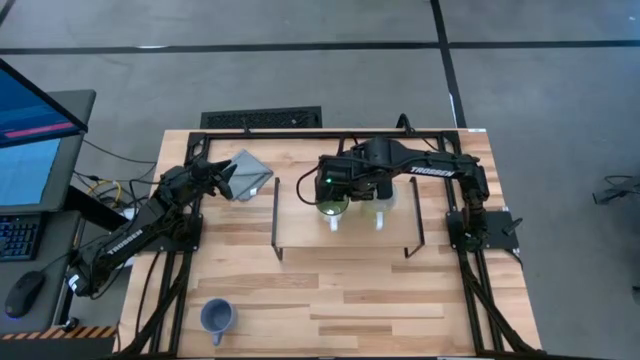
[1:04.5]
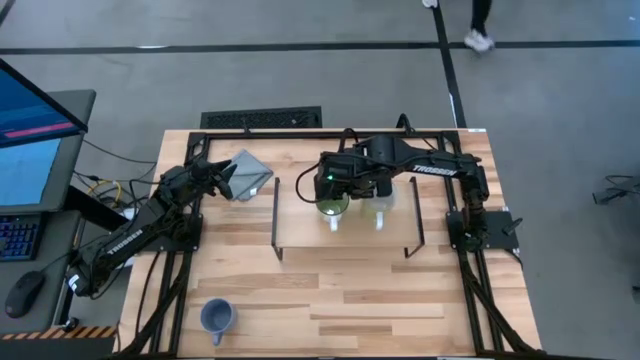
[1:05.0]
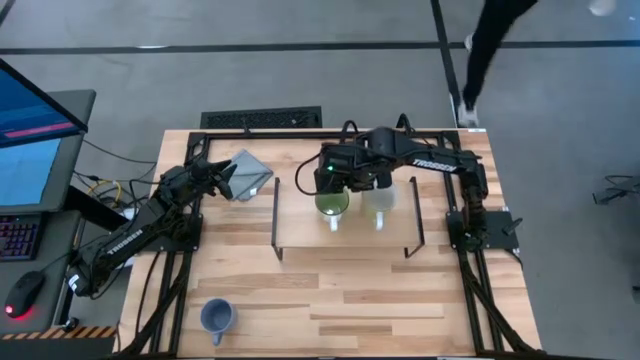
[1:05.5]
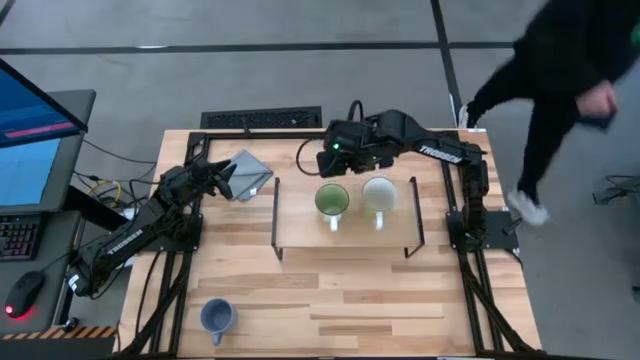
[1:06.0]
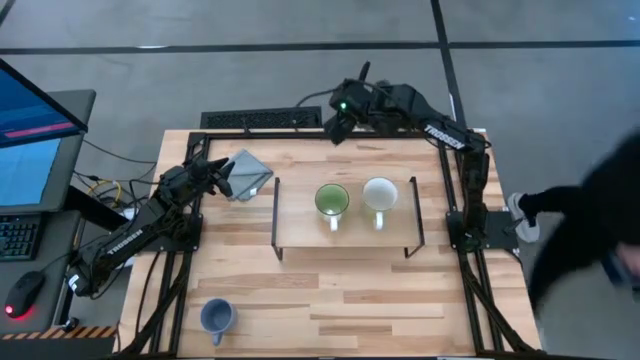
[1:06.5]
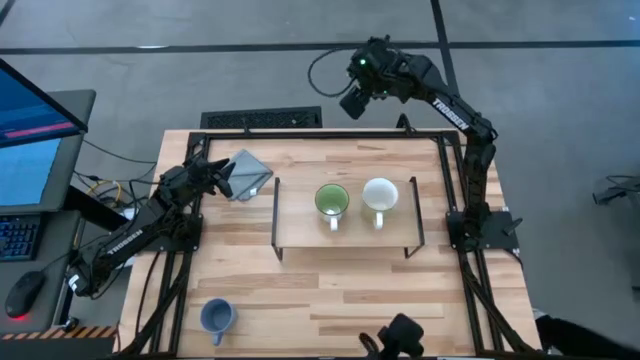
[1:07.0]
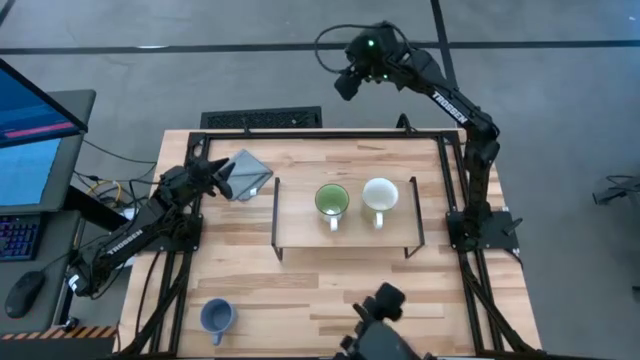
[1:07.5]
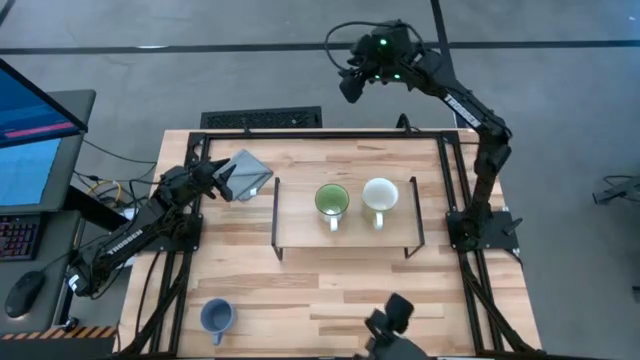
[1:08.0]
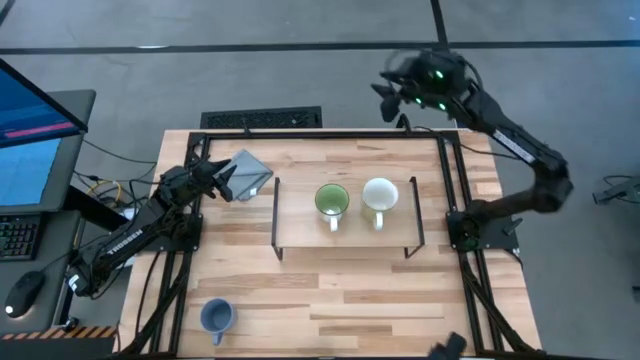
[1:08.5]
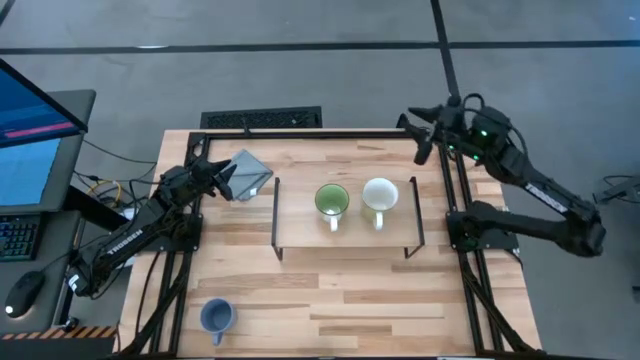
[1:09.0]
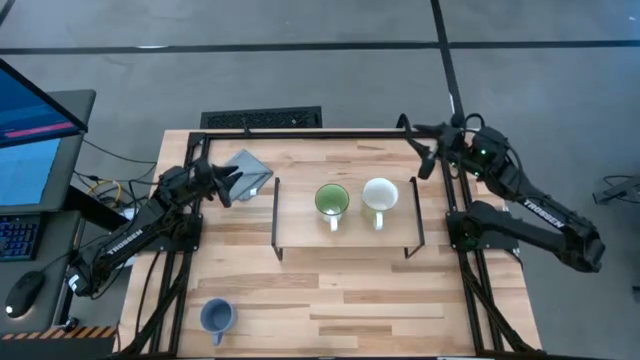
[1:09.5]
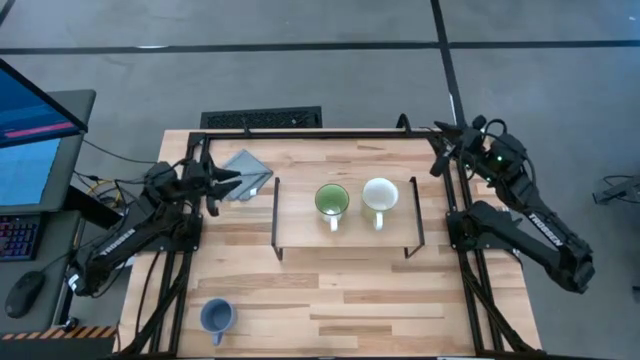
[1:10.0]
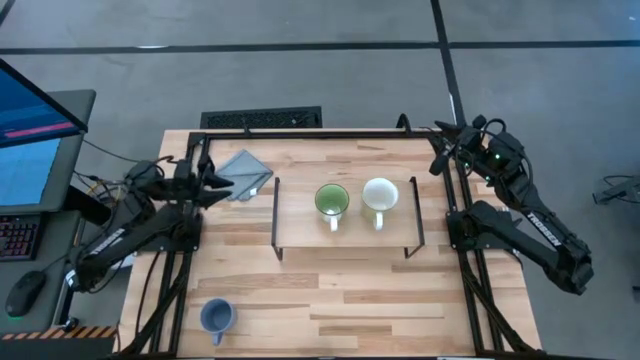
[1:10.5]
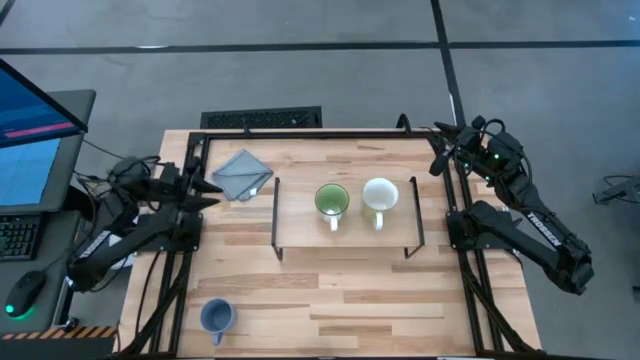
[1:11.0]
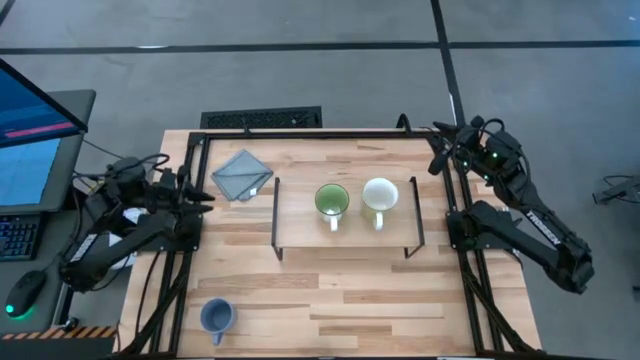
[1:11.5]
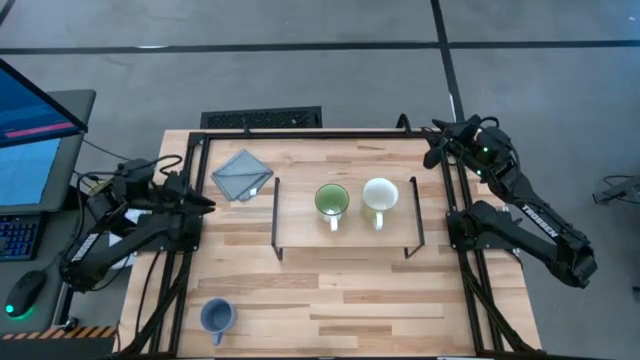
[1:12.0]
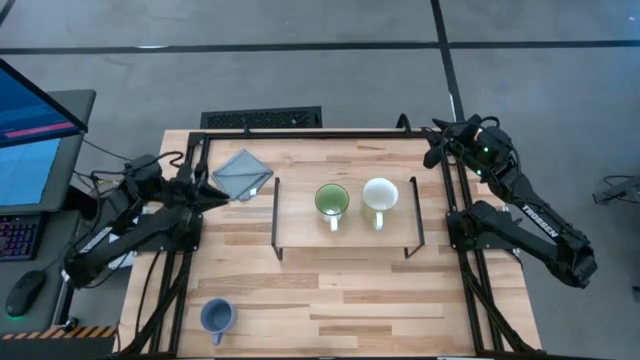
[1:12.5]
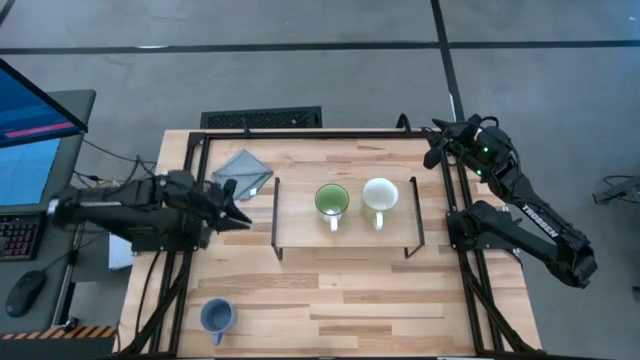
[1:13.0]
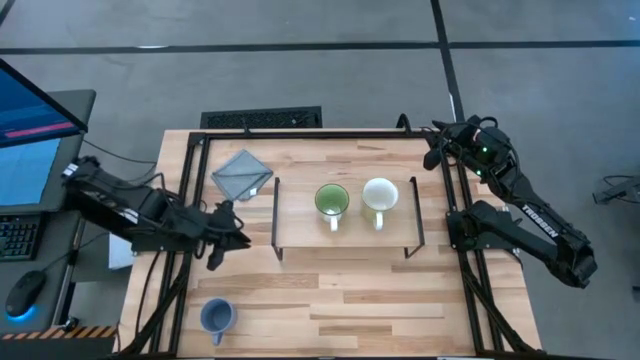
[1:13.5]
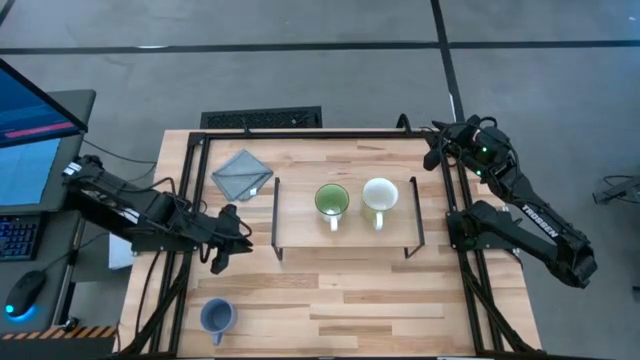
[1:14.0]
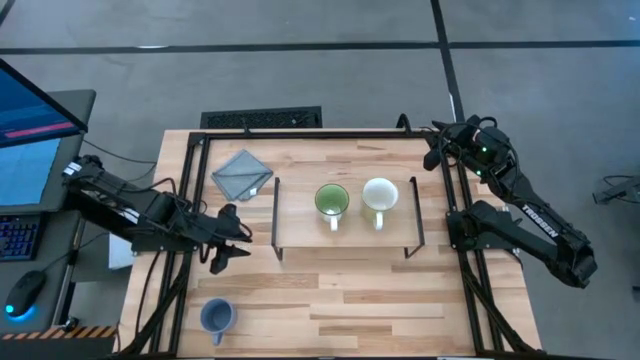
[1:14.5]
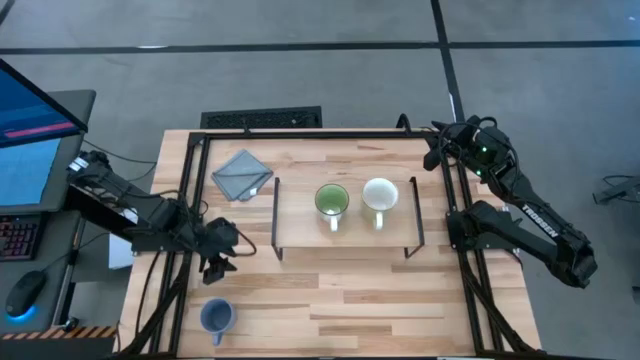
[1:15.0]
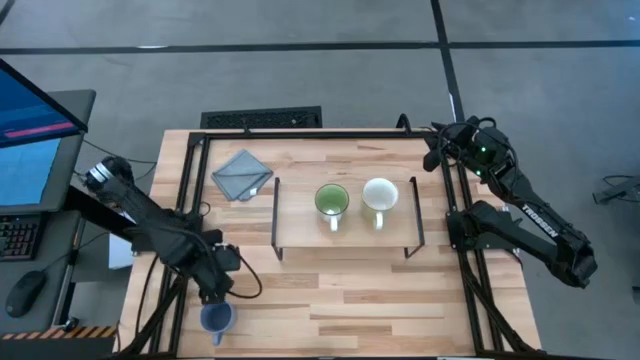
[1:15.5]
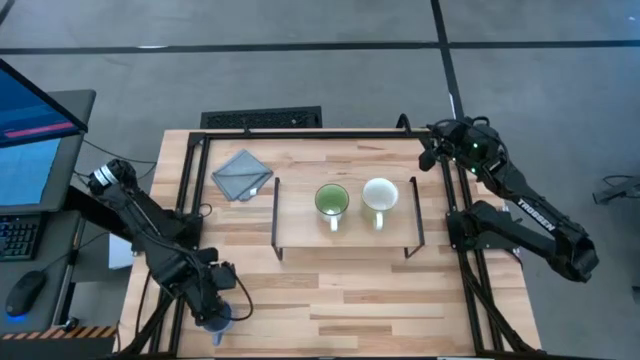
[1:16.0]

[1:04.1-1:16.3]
Task: Stack small to large cups/mugs on shelf
Put the blue mug on the shelf

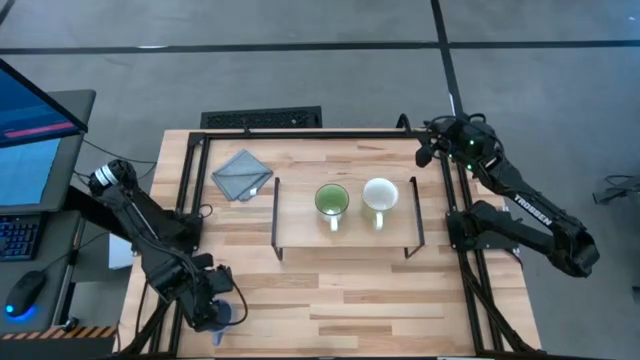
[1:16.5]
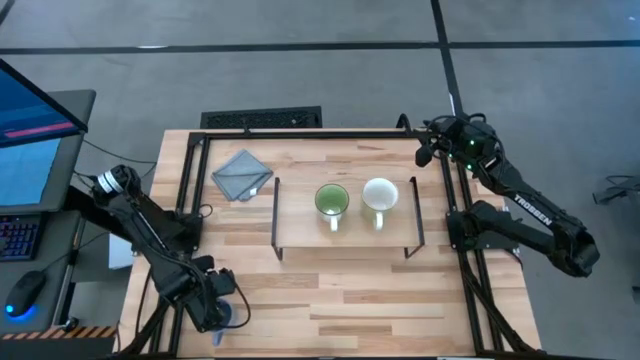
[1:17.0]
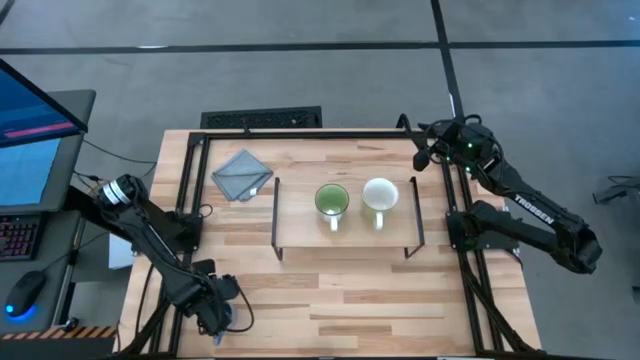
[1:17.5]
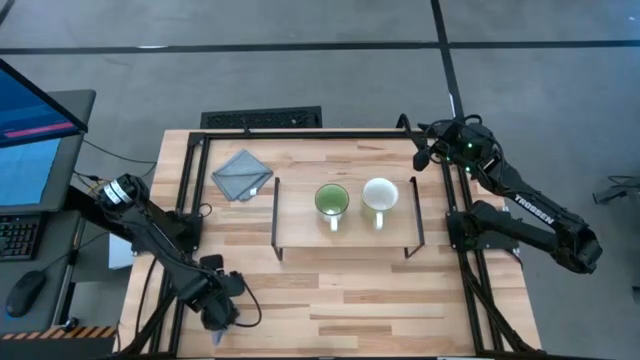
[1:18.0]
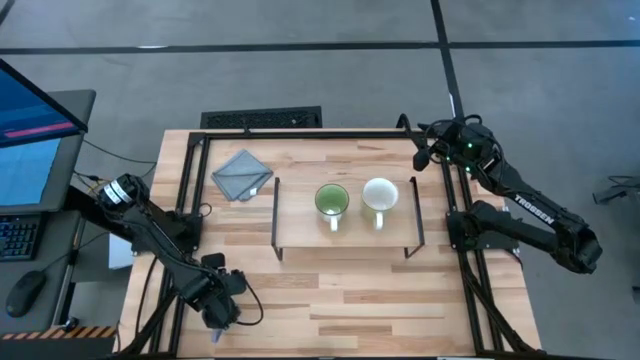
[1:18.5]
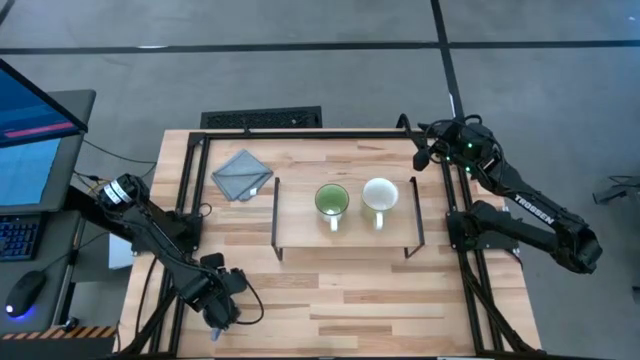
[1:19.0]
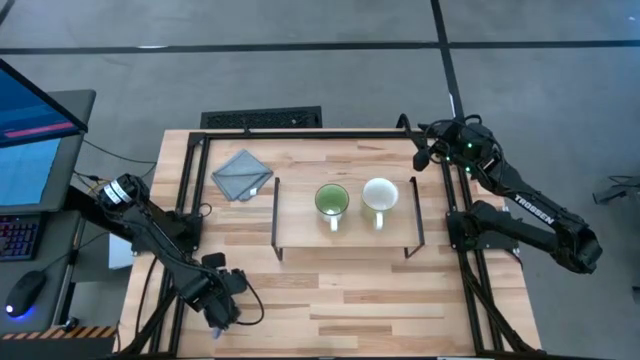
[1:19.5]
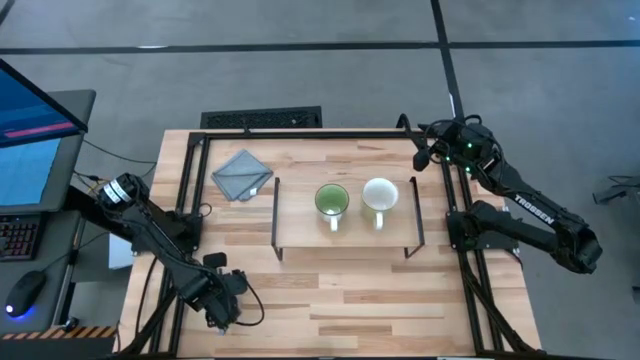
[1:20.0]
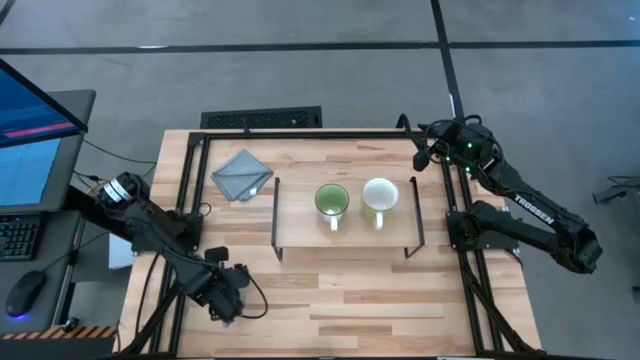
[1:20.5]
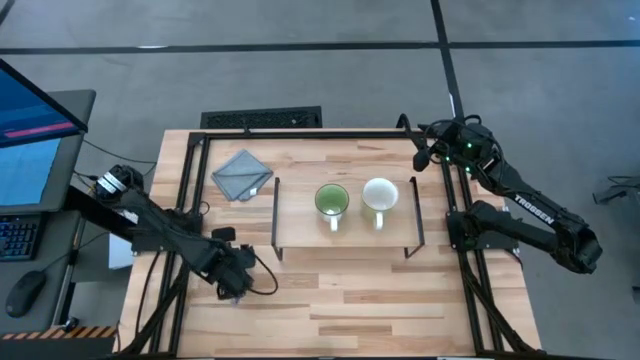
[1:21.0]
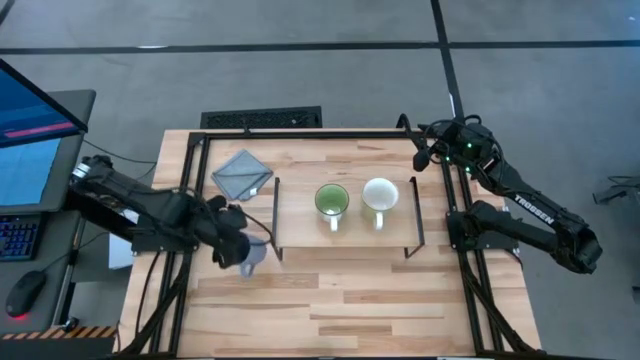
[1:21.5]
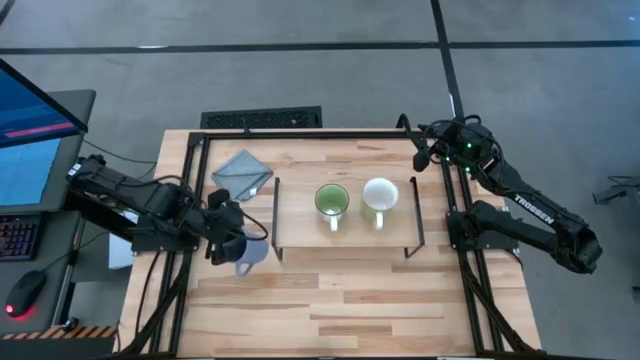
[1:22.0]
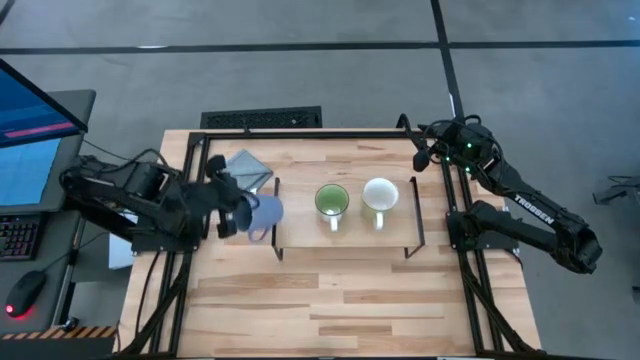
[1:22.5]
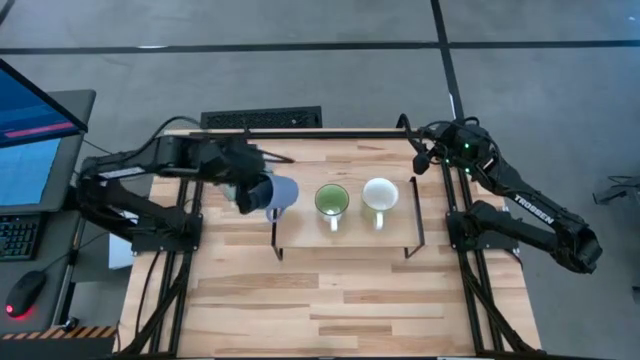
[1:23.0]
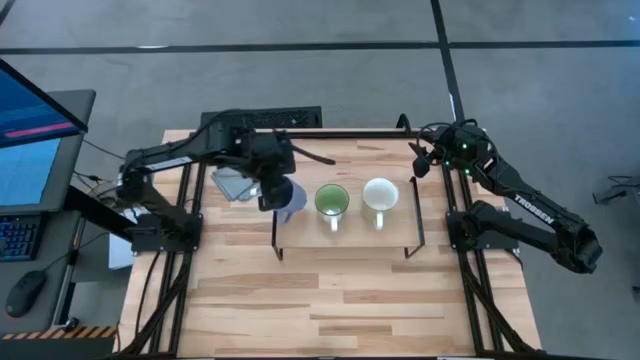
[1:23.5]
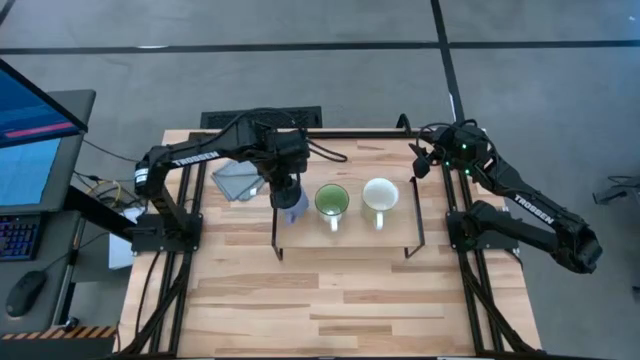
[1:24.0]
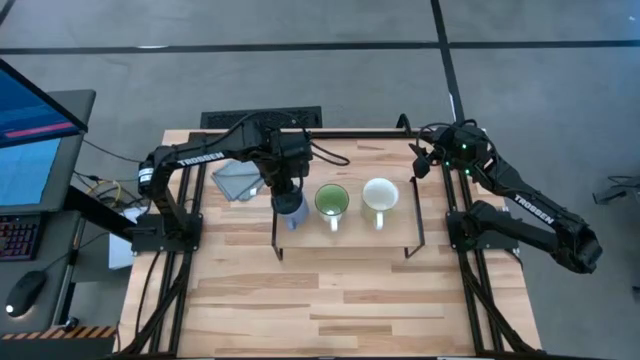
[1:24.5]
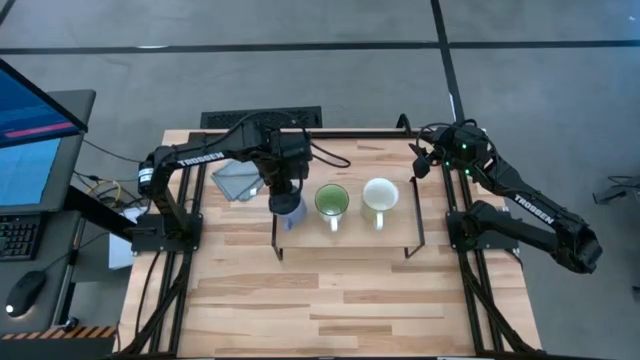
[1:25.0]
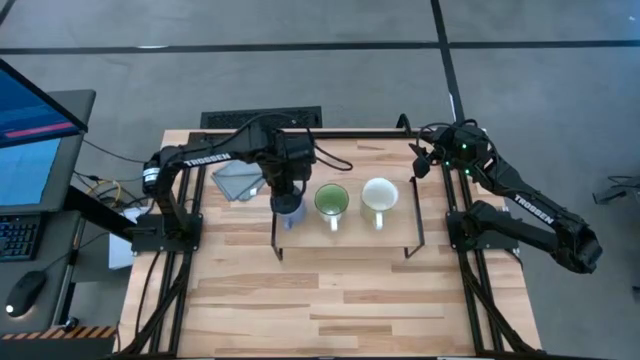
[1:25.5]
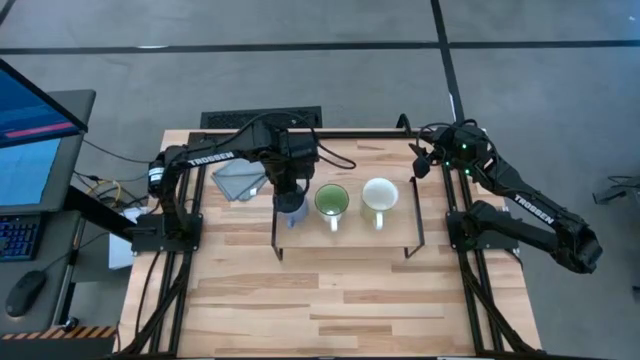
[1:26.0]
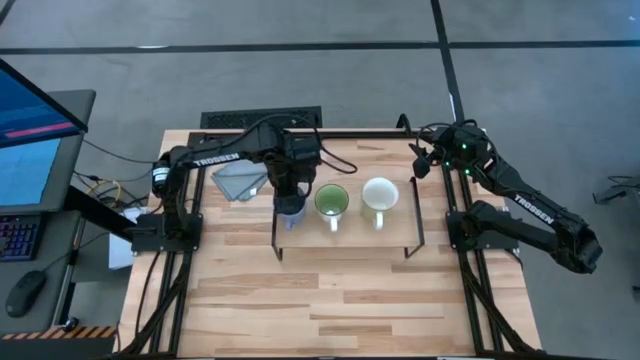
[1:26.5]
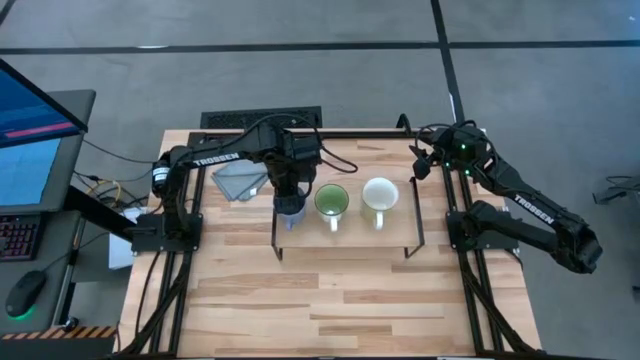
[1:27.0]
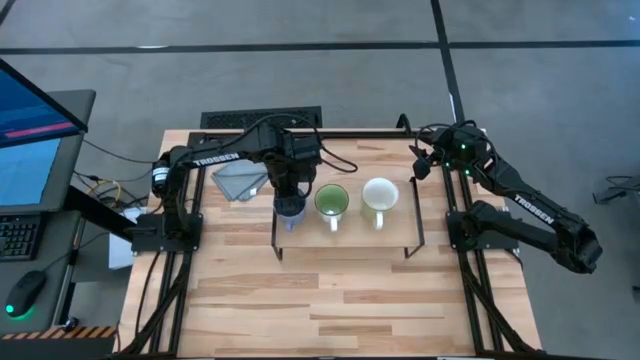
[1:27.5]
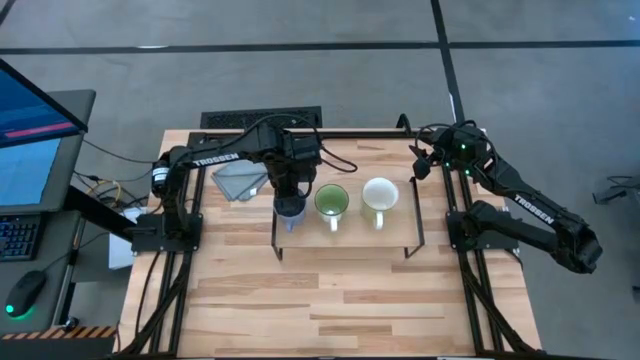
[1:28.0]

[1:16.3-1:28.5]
Put the blue mug on the shelf
